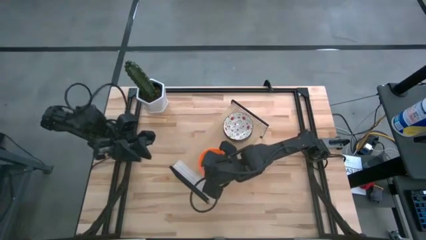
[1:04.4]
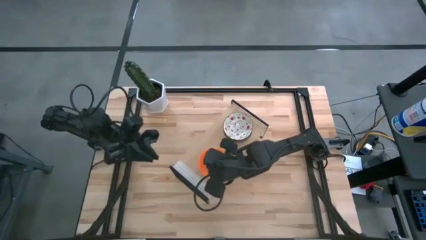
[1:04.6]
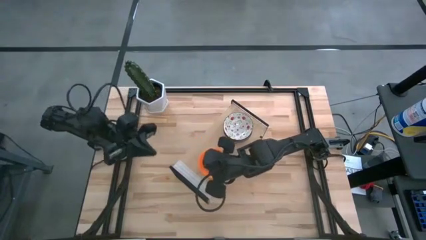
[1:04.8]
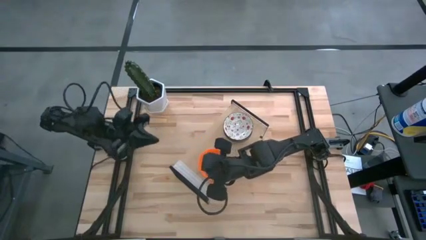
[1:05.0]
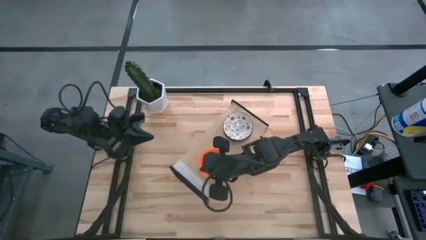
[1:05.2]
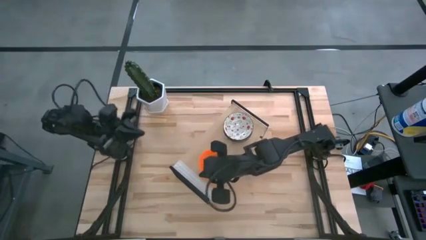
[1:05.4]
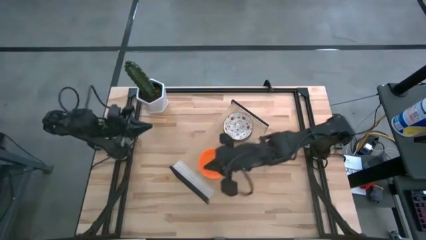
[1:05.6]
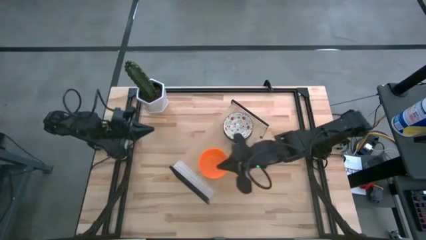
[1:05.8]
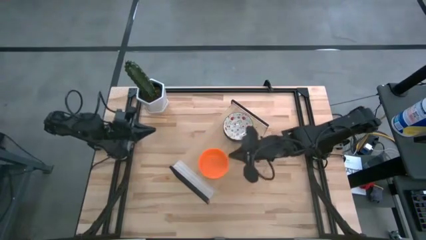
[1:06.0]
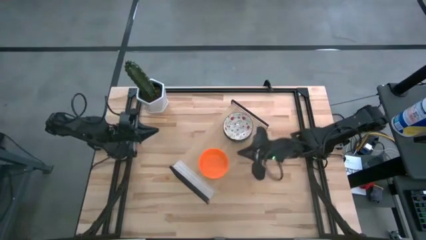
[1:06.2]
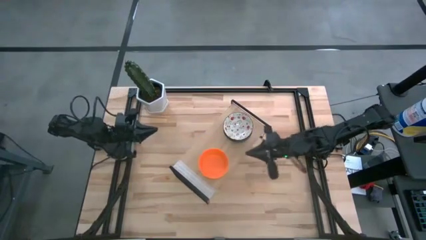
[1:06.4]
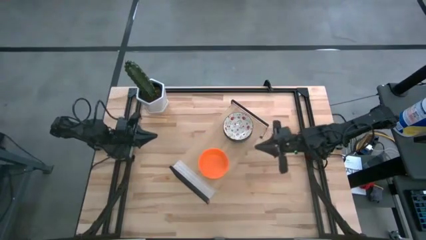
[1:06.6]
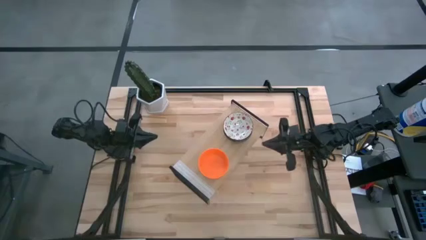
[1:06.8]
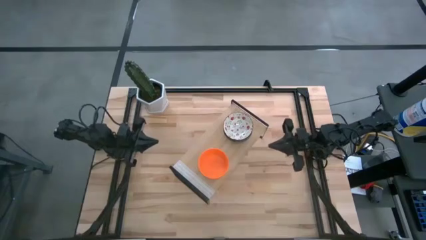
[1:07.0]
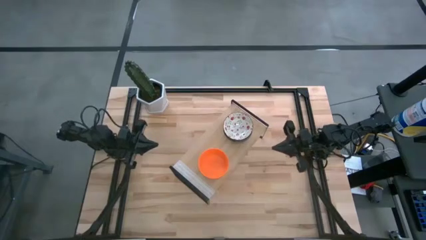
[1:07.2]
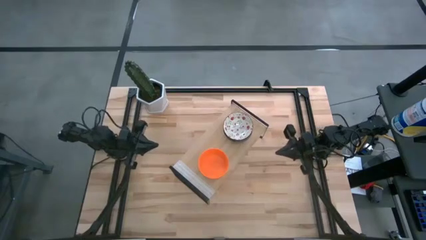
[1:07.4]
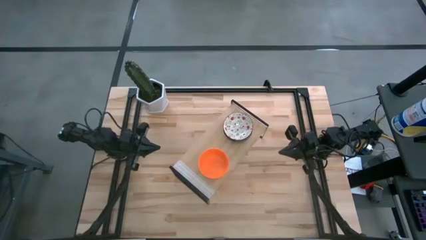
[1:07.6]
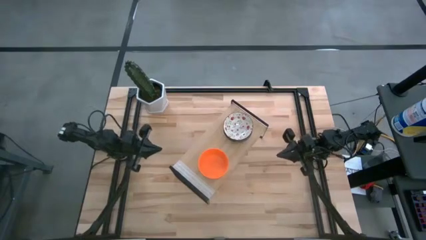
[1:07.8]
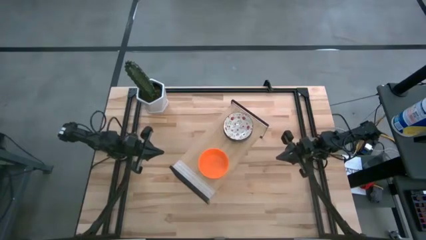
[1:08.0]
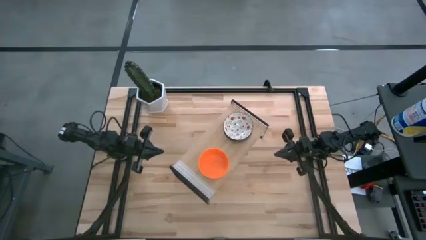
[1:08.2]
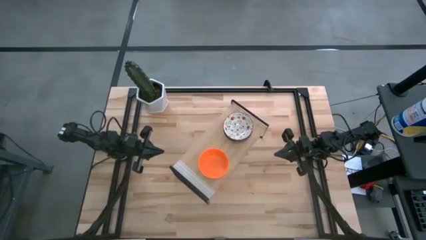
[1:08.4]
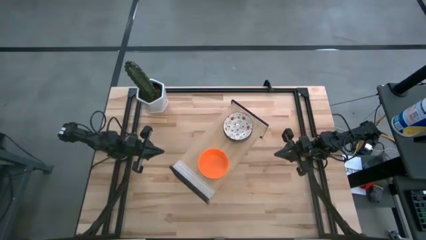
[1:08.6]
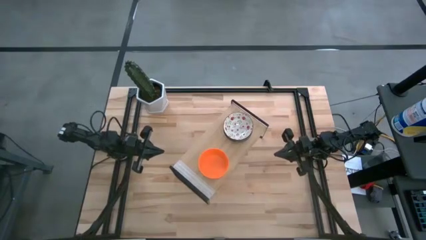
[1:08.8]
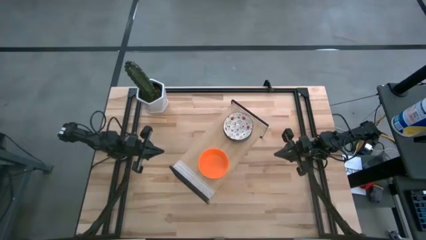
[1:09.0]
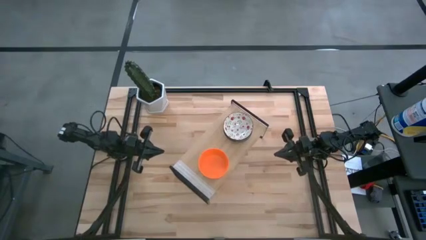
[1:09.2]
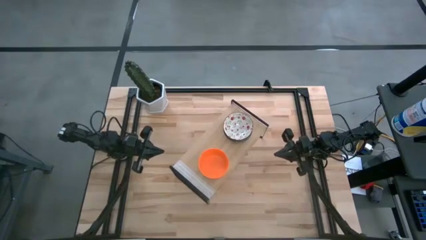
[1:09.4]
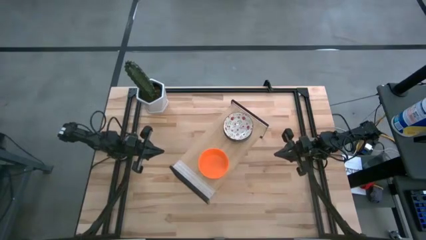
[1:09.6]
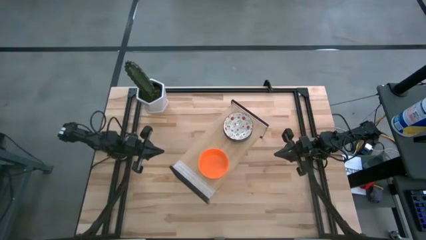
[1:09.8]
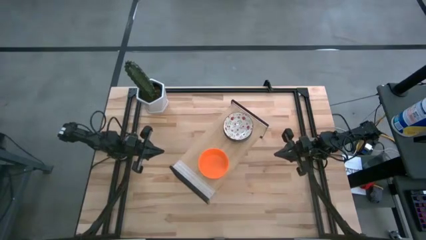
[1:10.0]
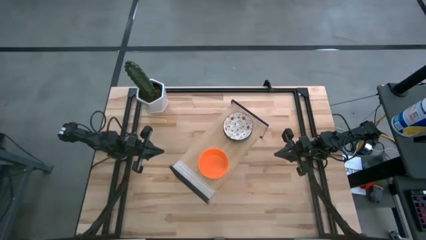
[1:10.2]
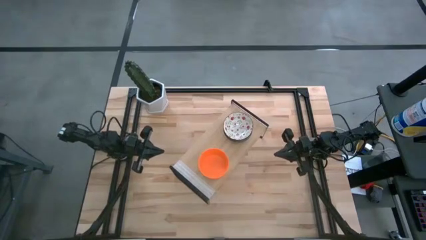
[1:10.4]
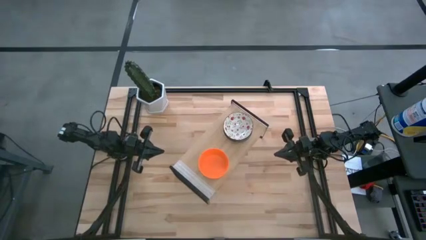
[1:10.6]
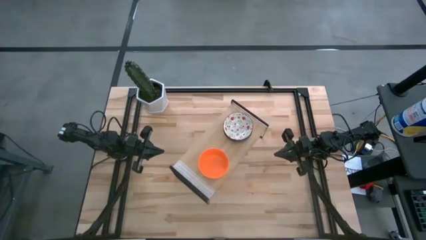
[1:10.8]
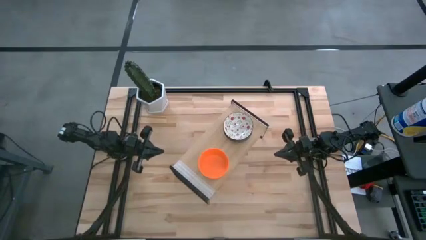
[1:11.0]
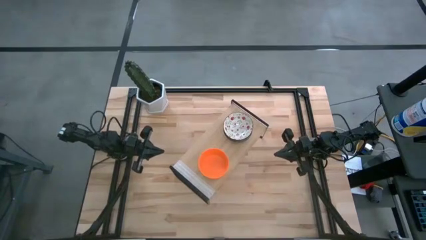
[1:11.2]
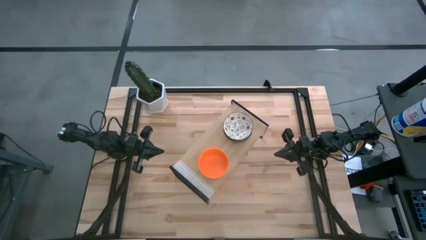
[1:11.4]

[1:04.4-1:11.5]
Task: Pick & Place Mini bowls
Return to Home Position

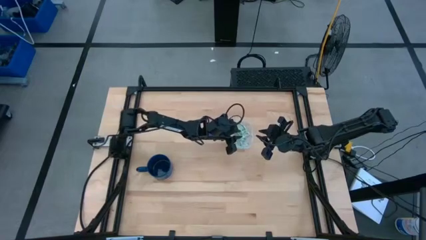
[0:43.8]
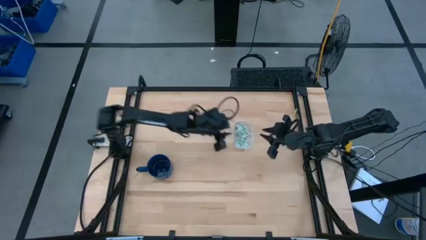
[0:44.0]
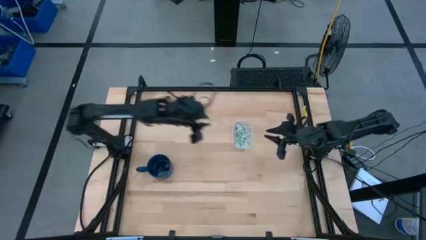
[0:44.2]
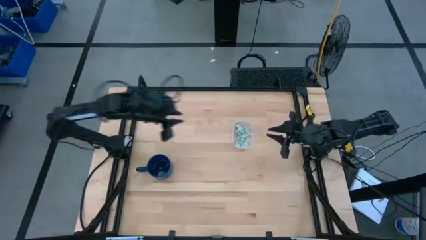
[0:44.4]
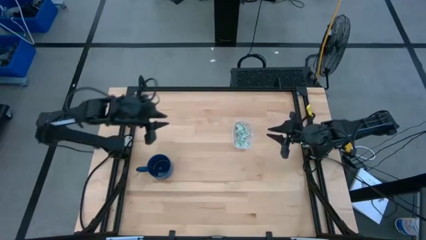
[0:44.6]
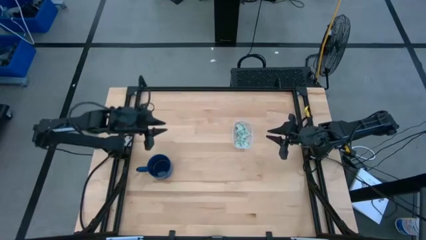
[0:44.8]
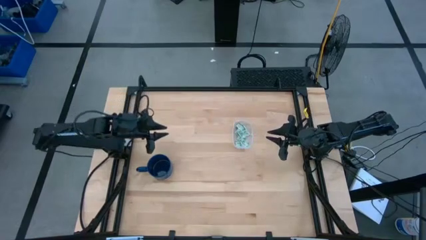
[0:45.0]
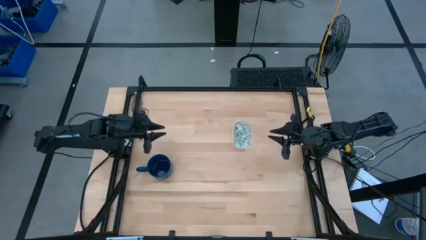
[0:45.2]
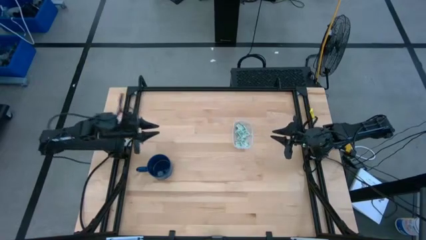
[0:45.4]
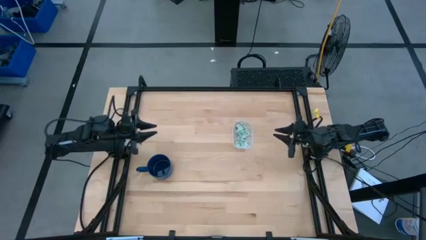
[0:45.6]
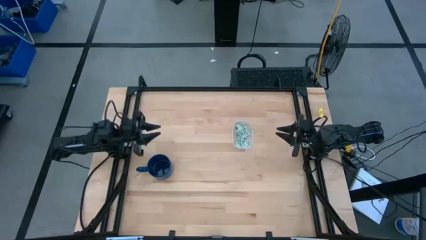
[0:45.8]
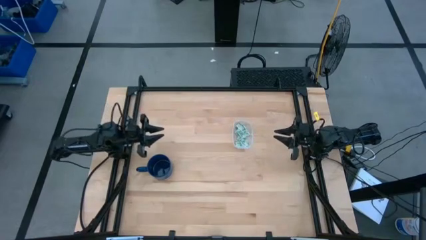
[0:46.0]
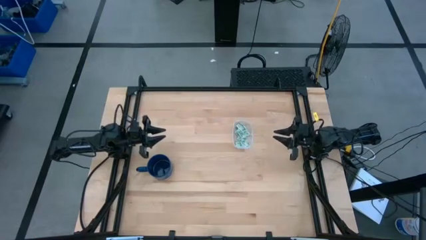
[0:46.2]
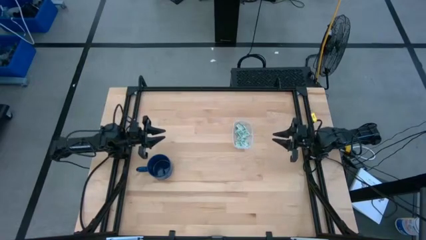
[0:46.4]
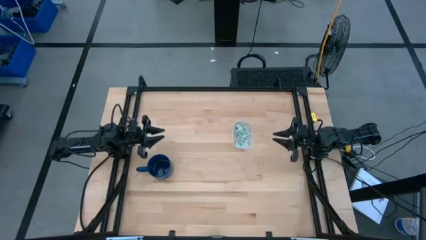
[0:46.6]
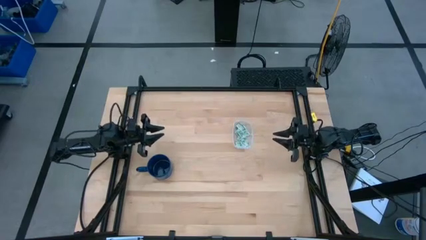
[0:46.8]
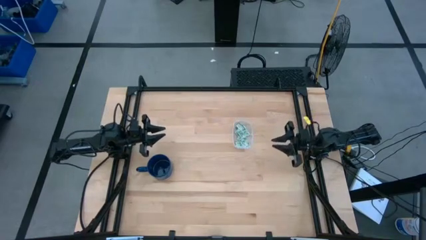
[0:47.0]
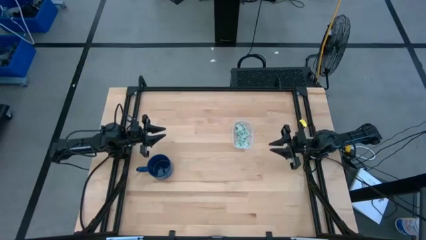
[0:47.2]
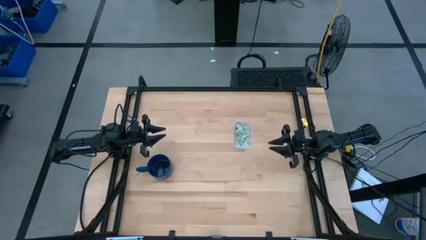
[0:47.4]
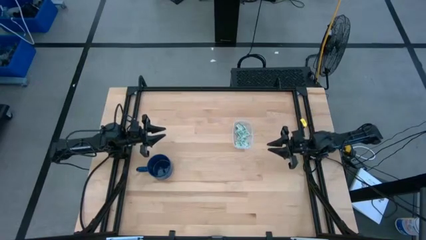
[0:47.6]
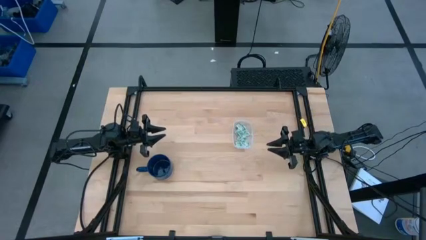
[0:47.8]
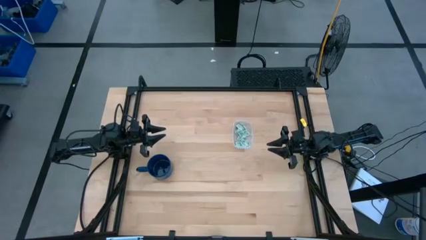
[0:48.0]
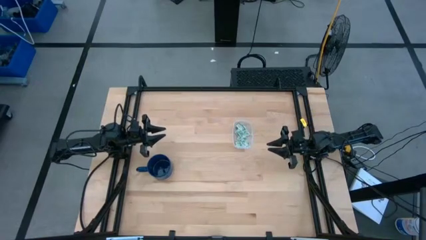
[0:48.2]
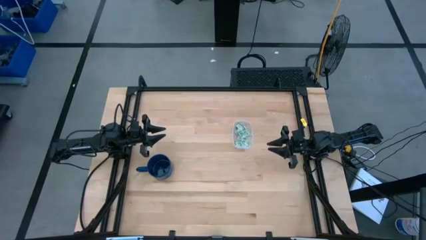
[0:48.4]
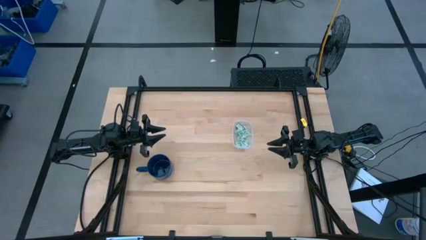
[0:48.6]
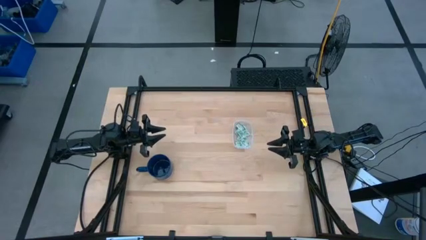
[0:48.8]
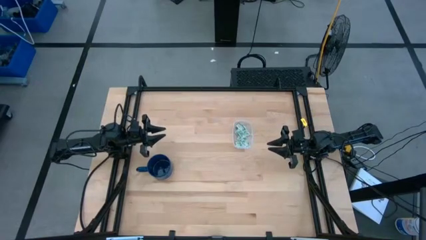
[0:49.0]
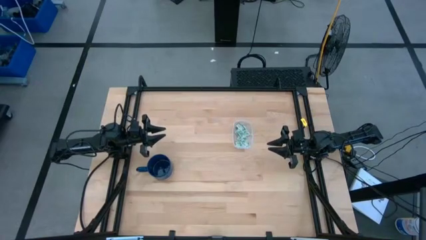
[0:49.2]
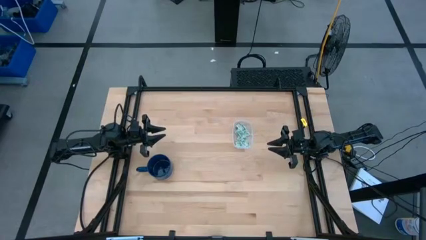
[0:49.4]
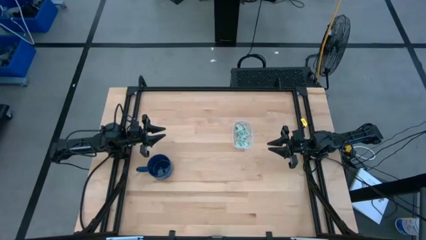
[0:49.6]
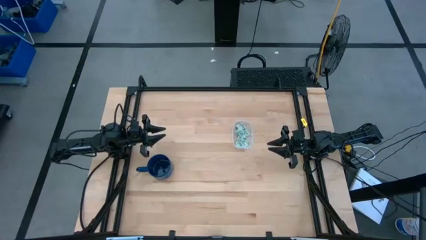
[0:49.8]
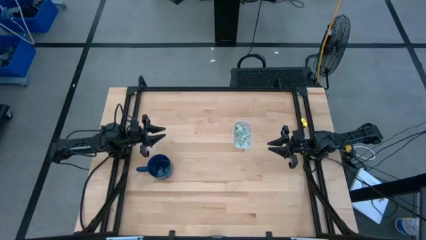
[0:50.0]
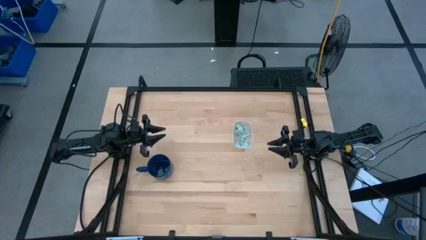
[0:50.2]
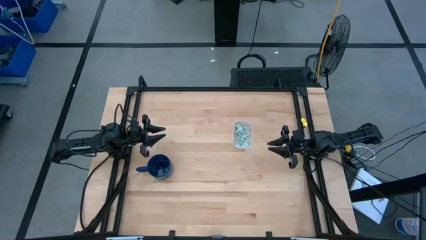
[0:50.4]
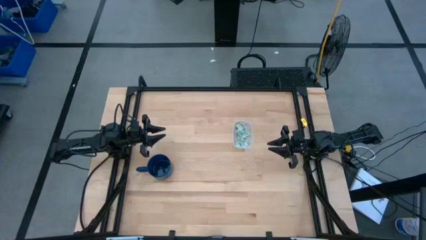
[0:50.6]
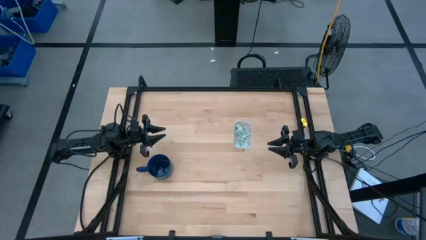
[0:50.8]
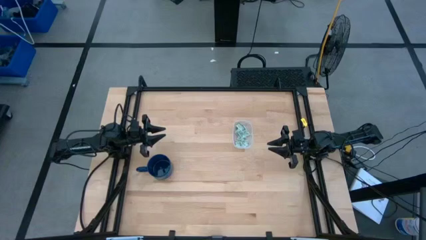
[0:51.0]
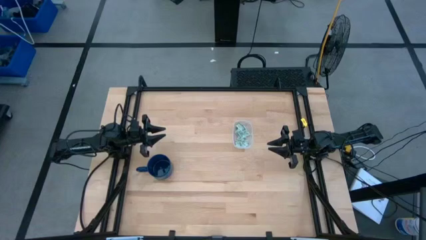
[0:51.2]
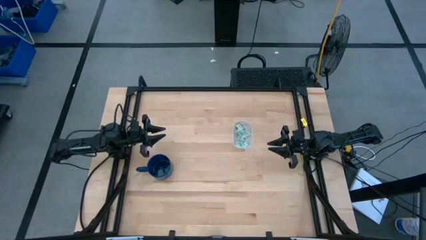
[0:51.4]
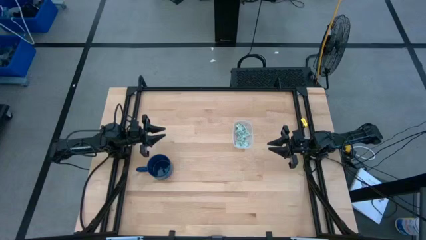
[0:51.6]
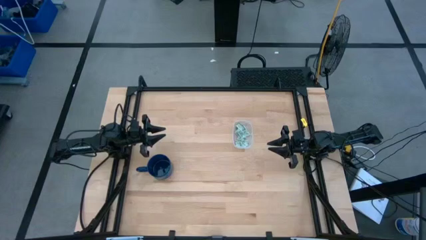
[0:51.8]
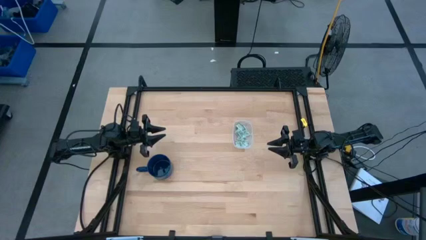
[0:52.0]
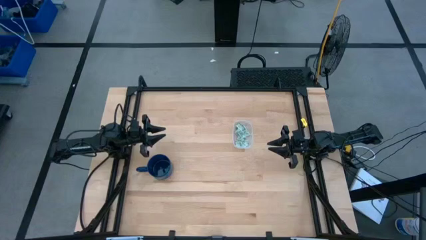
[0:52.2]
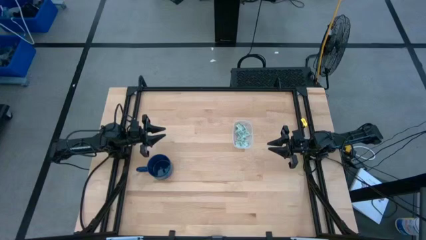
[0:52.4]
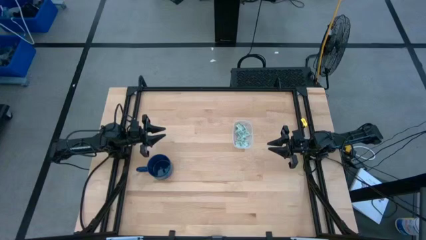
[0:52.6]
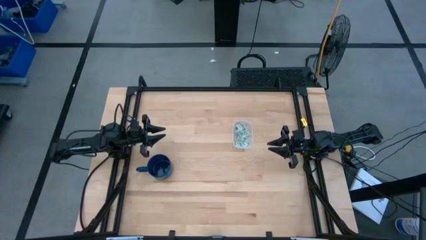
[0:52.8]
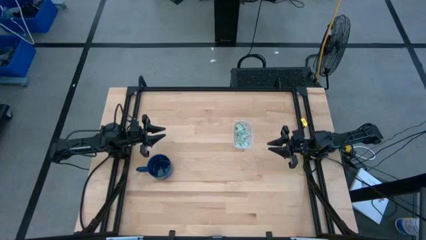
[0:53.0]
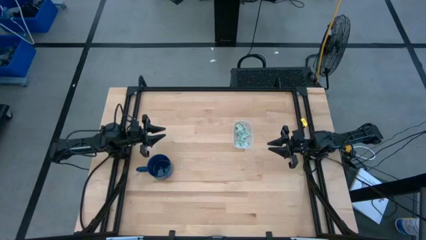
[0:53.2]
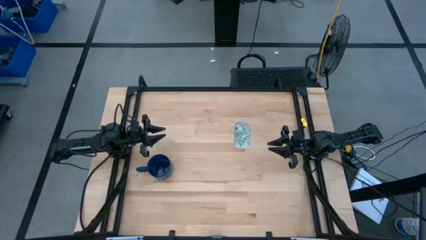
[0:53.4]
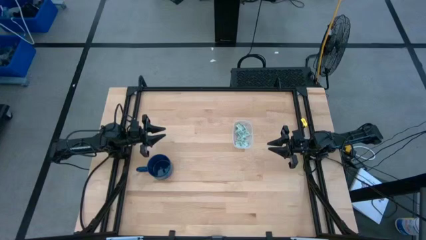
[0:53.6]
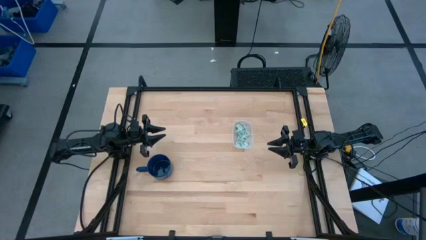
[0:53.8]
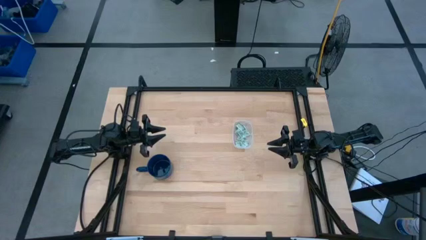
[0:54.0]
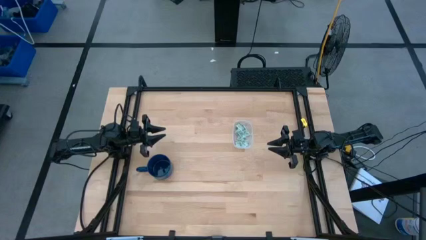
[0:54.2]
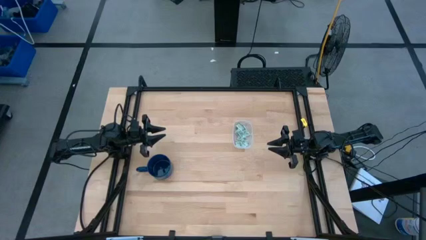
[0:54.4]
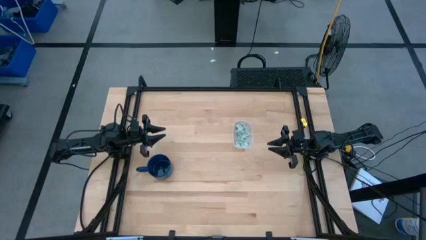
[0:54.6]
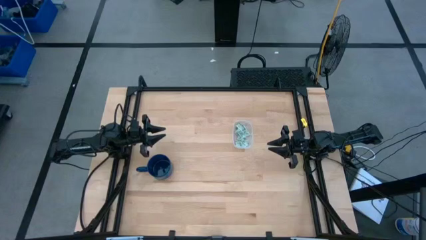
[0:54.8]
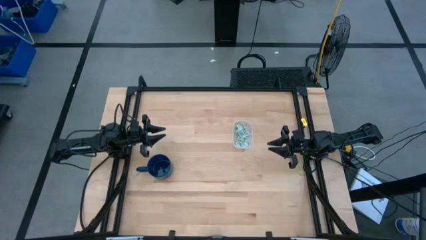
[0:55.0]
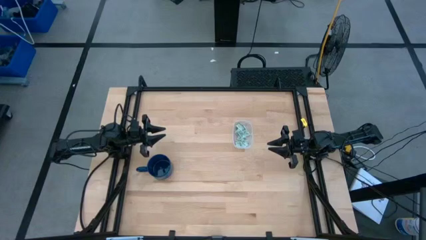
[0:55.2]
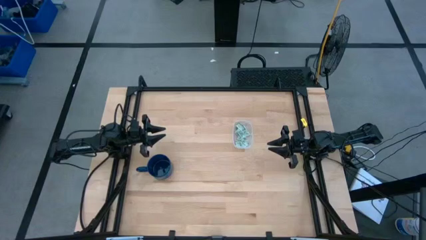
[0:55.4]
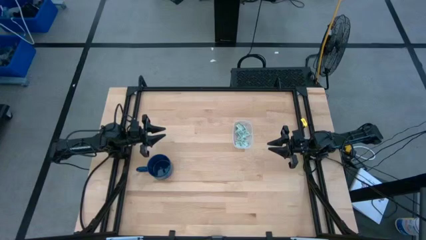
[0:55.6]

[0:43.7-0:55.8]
Task: Pick and place Stevia / Truvia into bins
Return to Home Position
